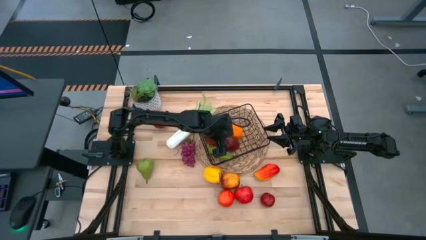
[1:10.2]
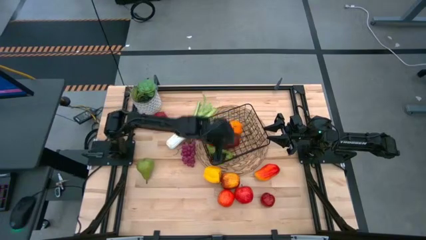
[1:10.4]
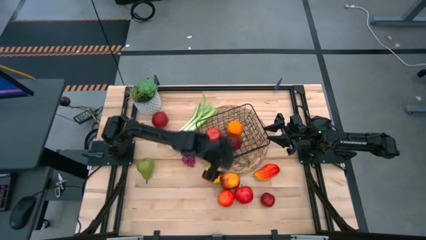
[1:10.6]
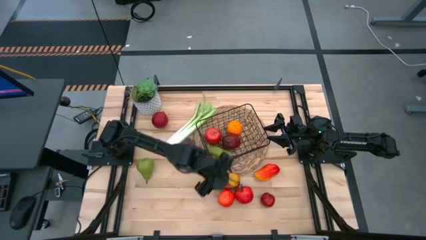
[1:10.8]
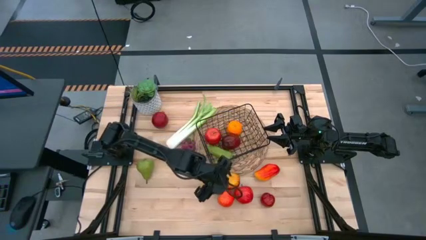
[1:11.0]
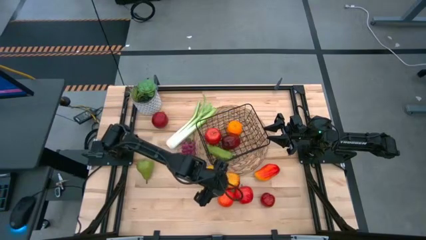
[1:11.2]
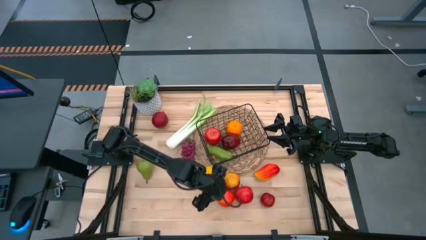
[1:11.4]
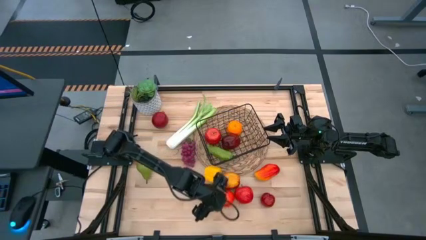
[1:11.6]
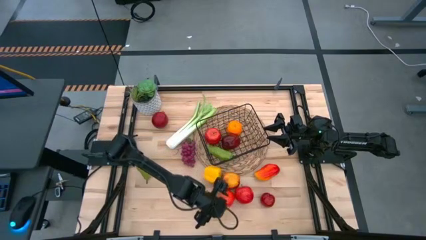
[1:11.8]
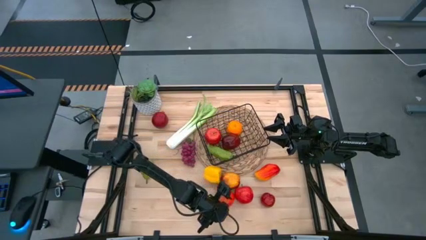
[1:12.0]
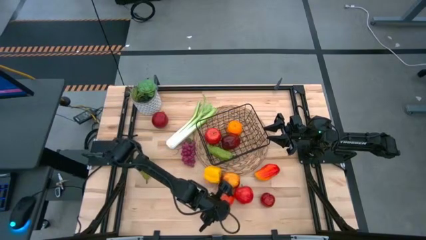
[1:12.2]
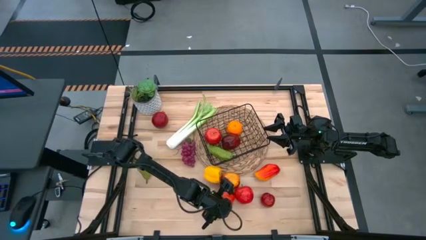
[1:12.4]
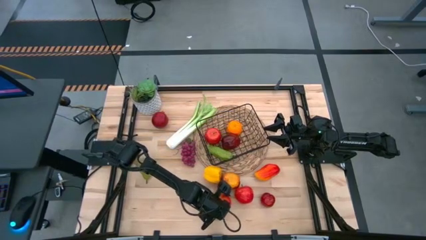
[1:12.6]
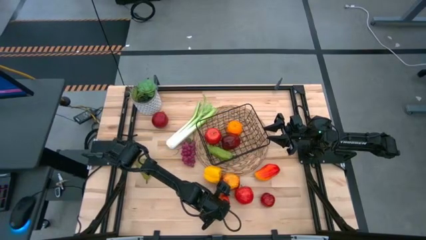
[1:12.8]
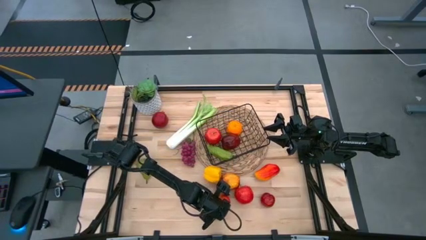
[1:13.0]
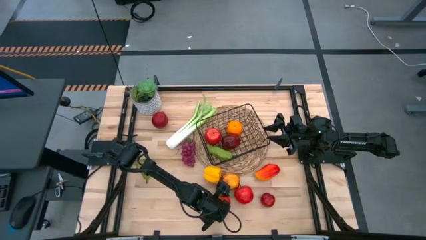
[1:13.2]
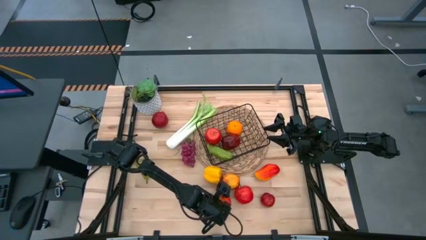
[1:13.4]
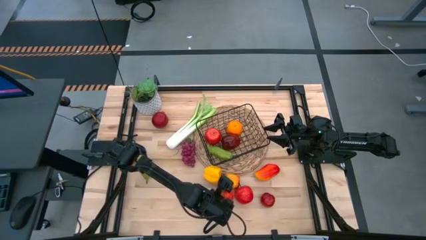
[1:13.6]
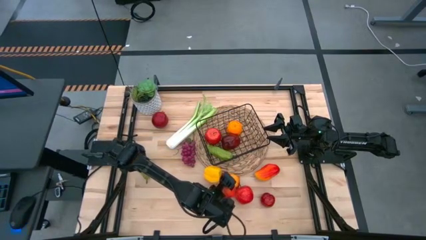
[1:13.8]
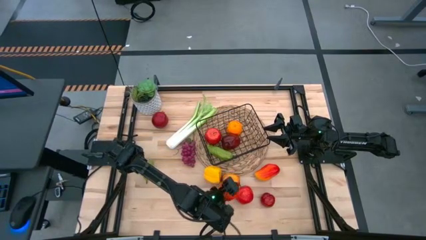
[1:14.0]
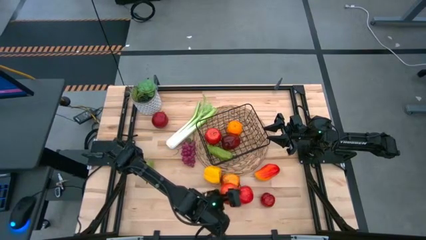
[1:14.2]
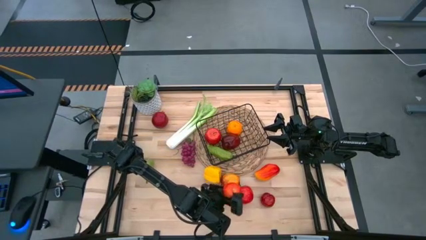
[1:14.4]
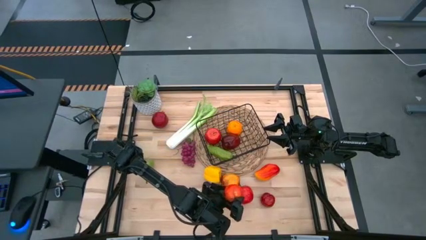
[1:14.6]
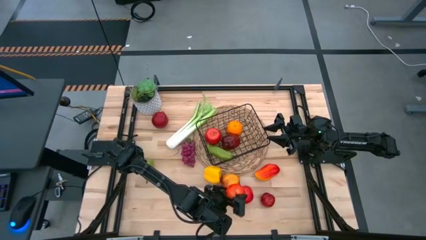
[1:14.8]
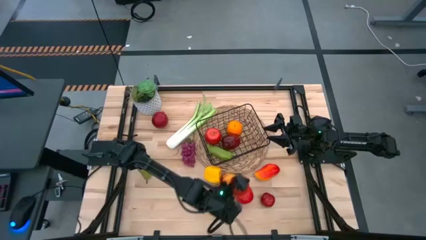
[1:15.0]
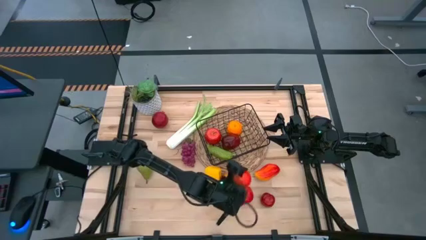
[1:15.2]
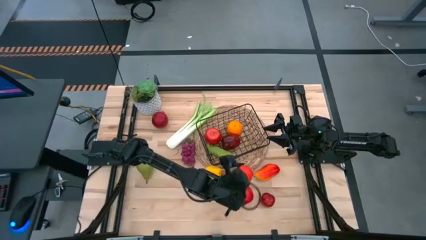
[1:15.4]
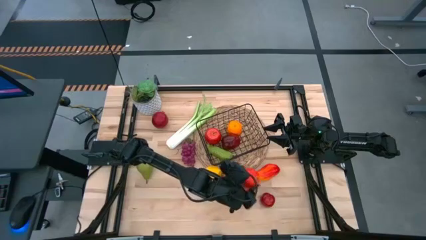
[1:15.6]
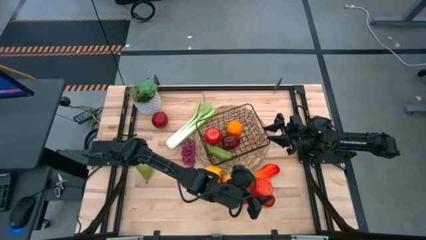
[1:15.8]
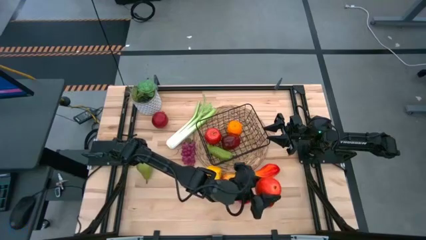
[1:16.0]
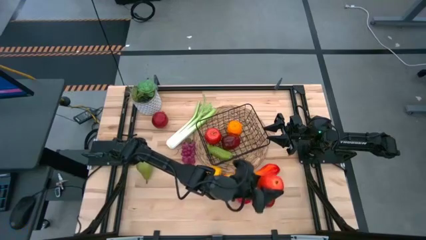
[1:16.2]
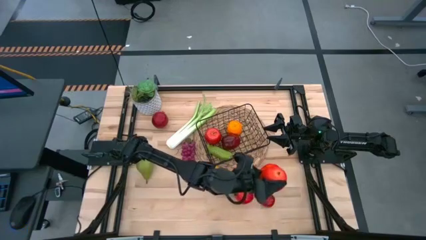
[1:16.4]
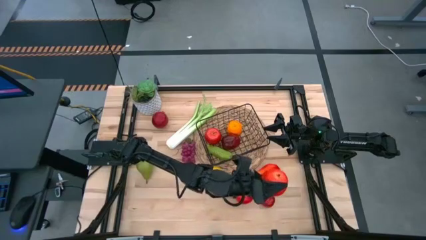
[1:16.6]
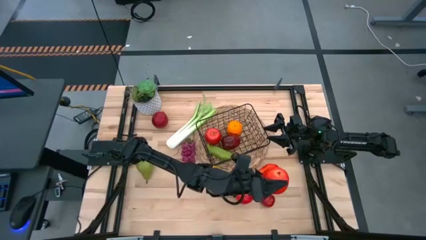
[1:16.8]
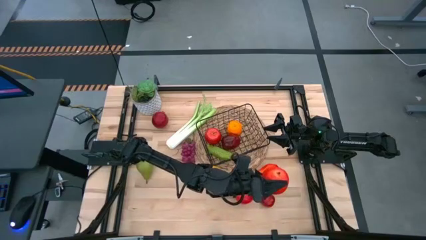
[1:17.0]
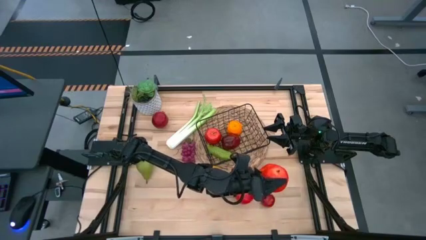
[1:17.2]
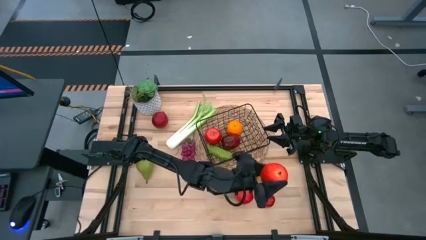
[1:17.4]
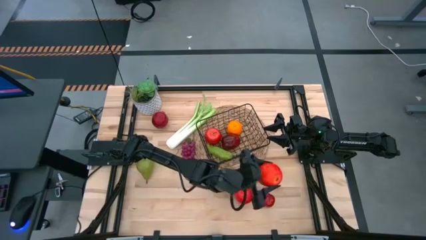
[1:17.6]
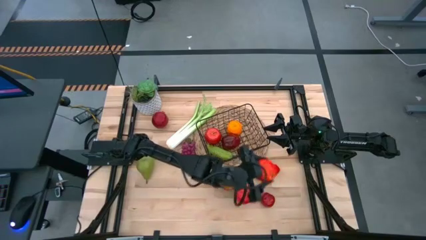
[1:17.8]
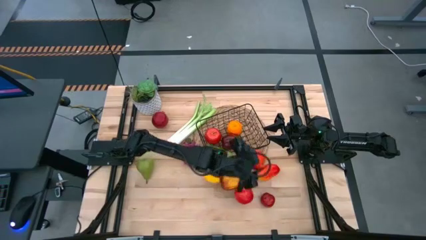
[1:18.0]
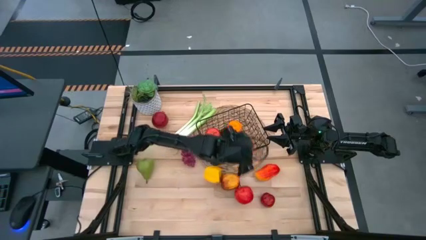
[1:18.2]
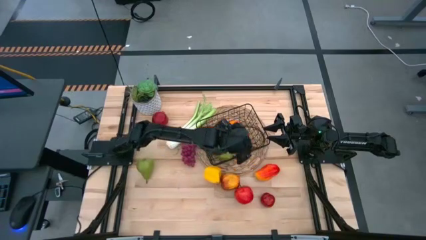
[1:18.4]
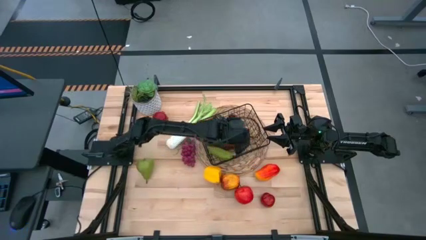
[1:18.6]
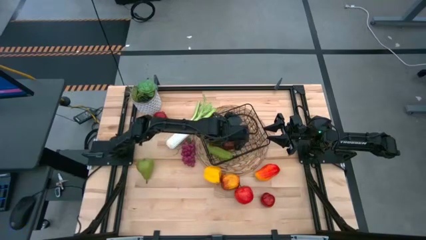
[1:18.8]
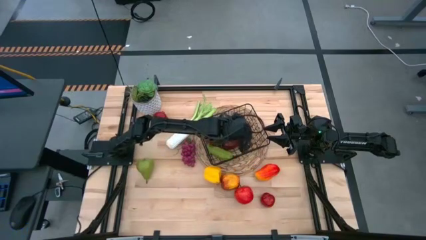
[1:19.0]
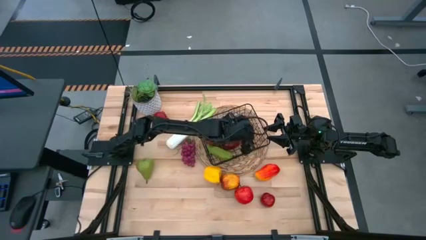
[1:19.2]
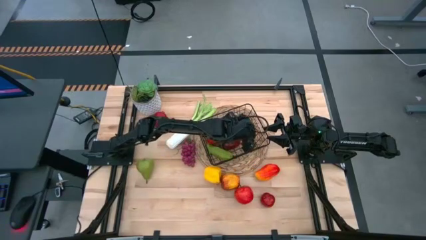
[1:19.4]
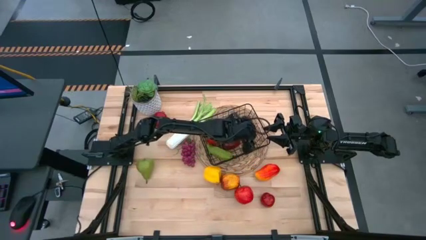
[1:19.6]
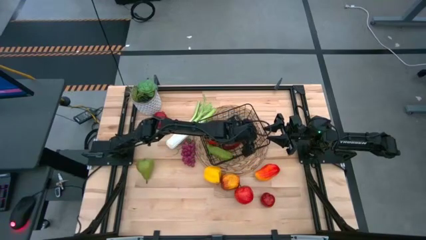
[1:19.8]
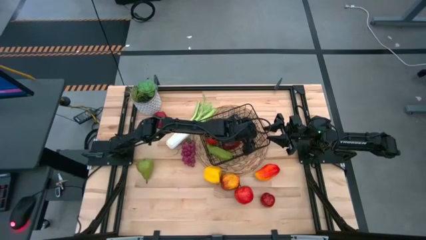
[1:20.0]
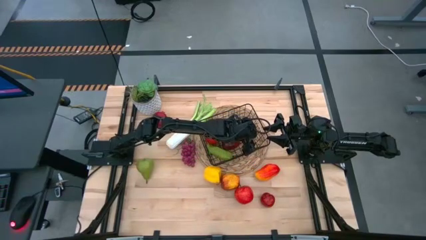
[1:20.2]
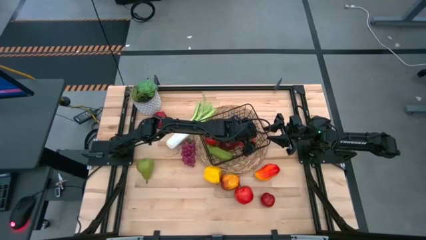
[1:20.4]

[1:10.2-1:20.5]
Task: Build produce basket
Put the red apple into the black wire basket
